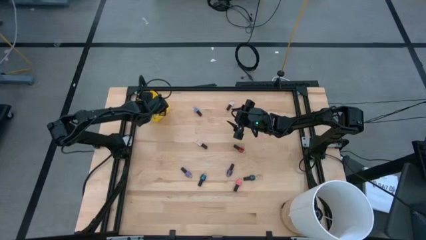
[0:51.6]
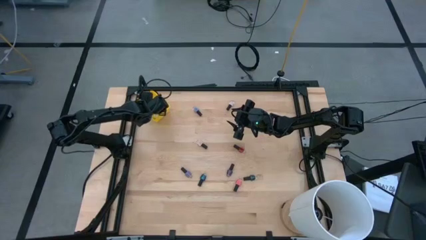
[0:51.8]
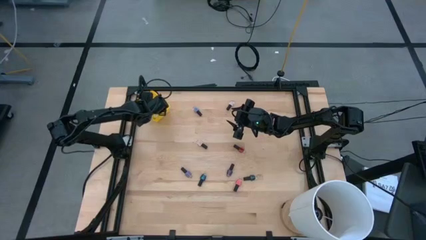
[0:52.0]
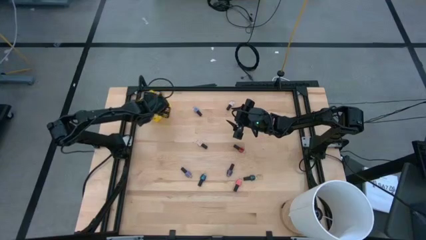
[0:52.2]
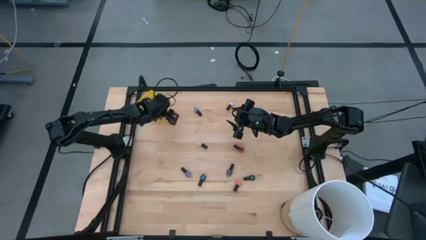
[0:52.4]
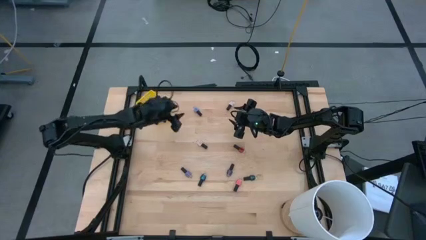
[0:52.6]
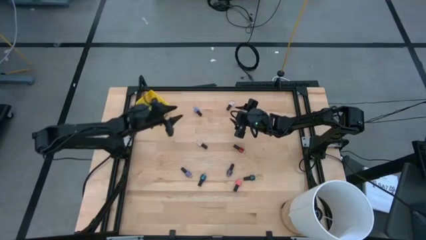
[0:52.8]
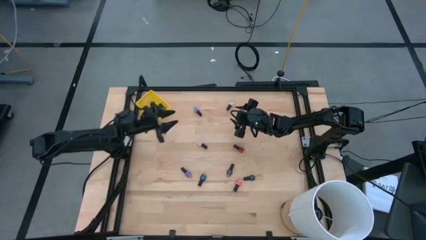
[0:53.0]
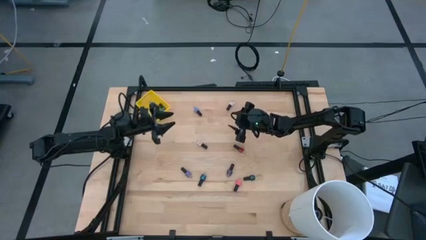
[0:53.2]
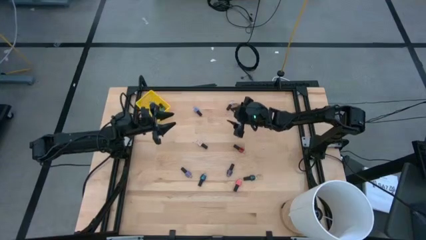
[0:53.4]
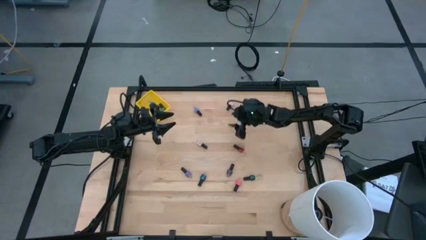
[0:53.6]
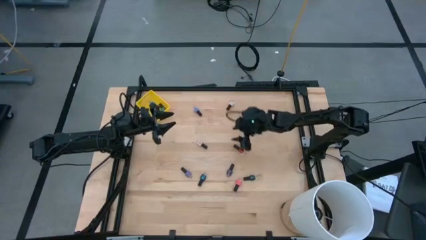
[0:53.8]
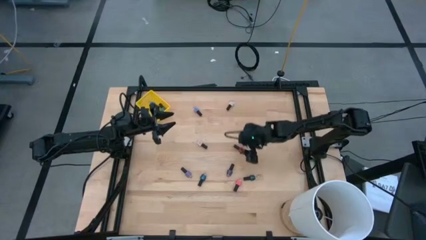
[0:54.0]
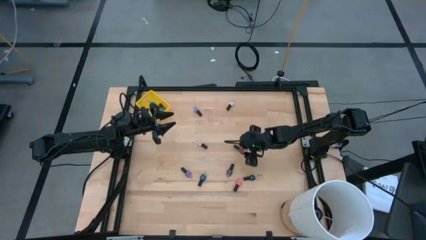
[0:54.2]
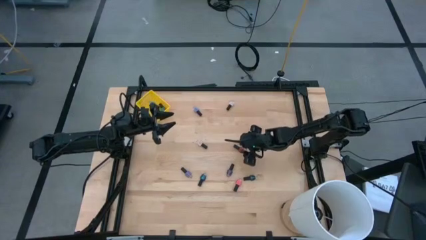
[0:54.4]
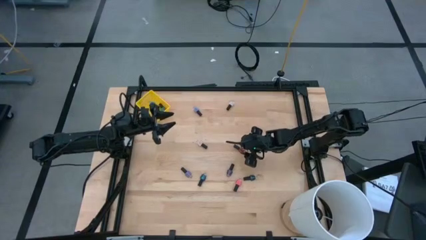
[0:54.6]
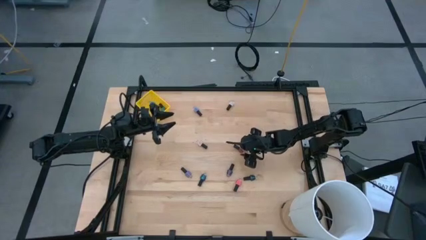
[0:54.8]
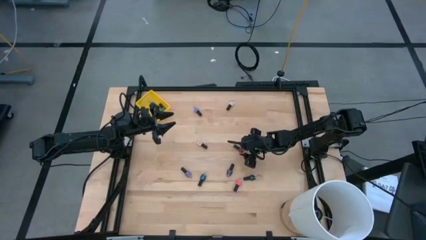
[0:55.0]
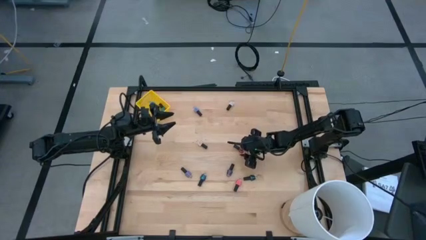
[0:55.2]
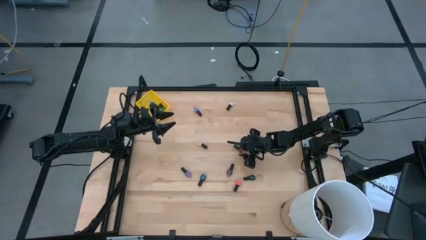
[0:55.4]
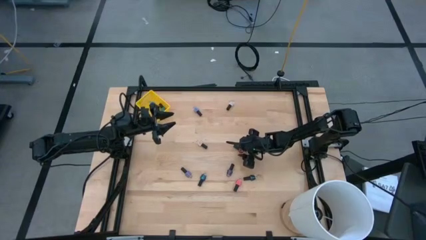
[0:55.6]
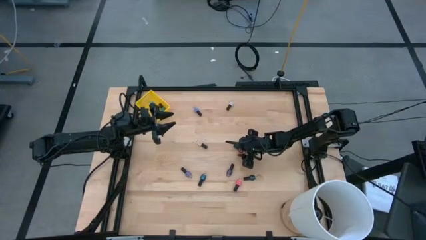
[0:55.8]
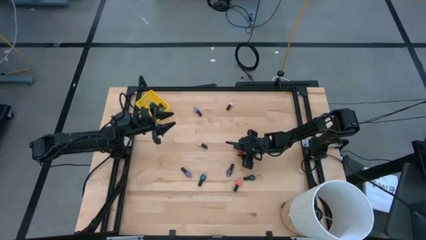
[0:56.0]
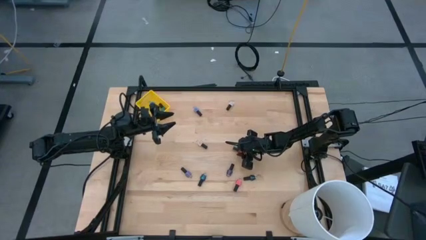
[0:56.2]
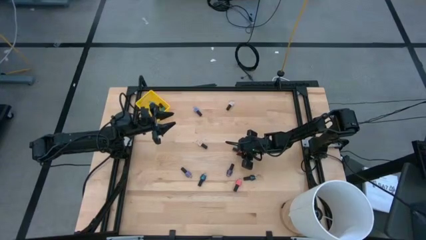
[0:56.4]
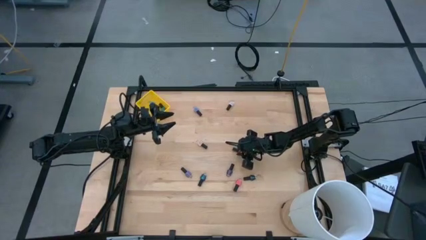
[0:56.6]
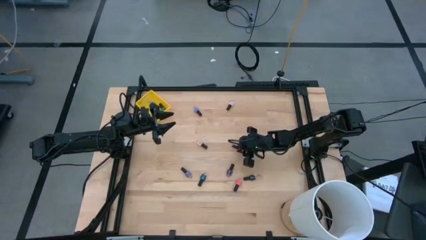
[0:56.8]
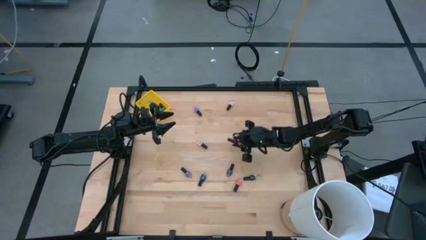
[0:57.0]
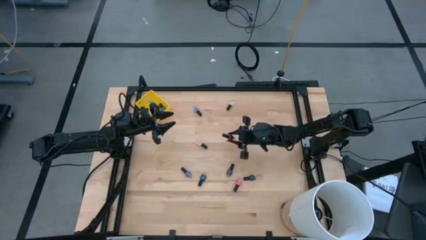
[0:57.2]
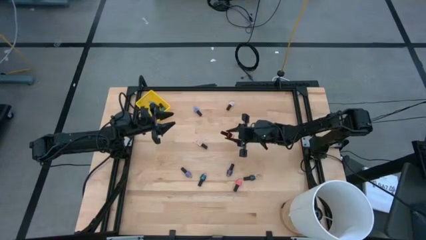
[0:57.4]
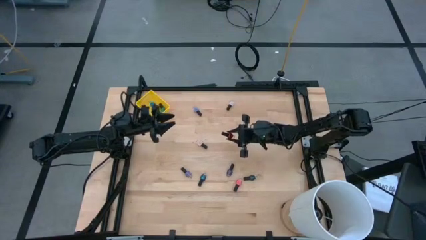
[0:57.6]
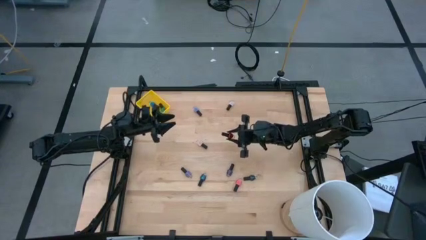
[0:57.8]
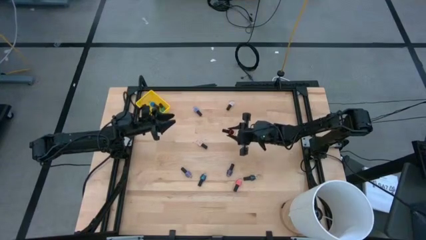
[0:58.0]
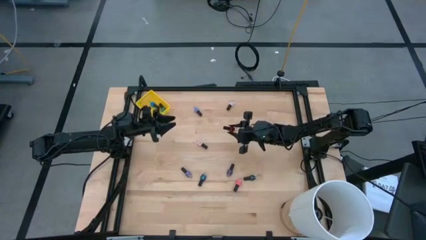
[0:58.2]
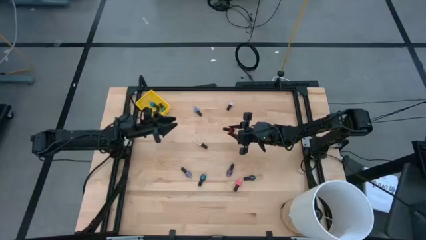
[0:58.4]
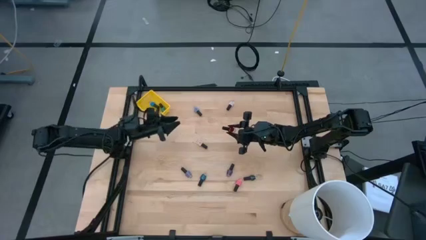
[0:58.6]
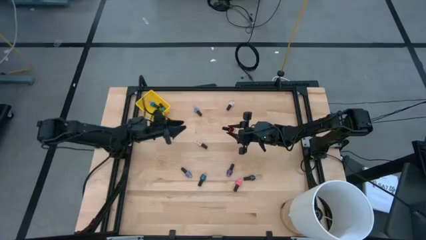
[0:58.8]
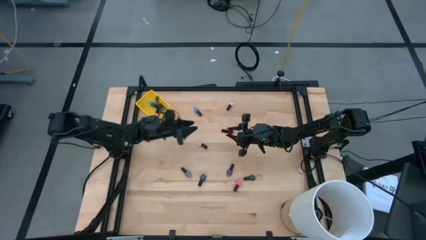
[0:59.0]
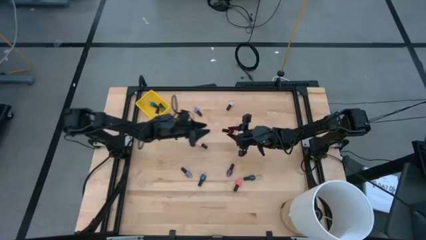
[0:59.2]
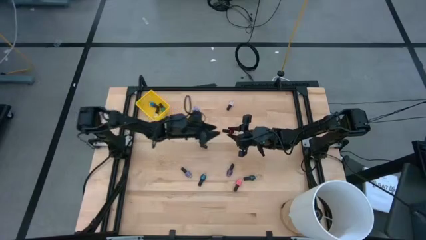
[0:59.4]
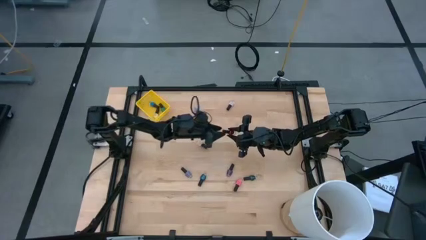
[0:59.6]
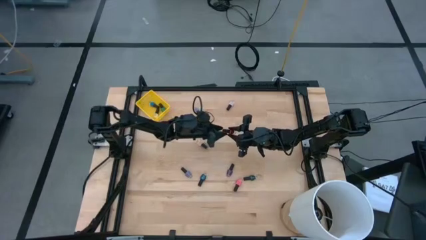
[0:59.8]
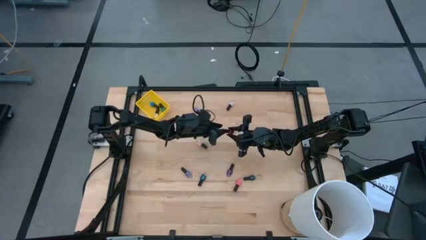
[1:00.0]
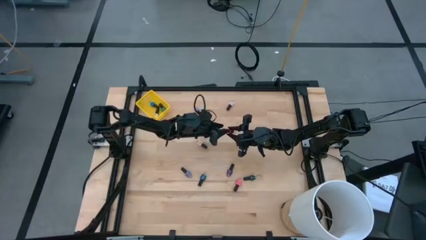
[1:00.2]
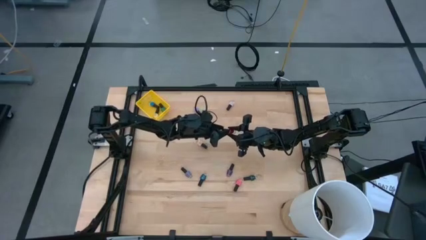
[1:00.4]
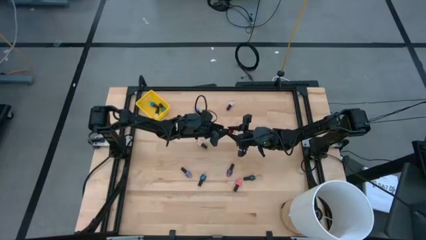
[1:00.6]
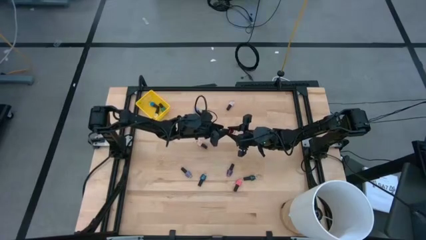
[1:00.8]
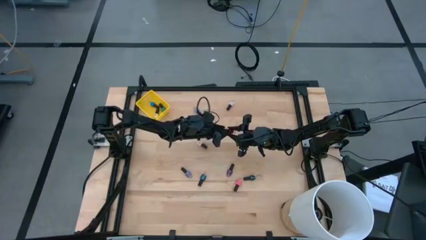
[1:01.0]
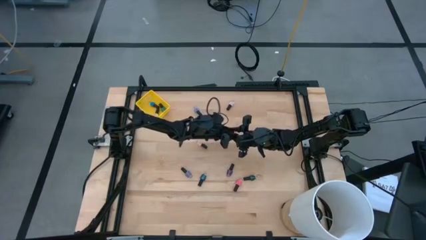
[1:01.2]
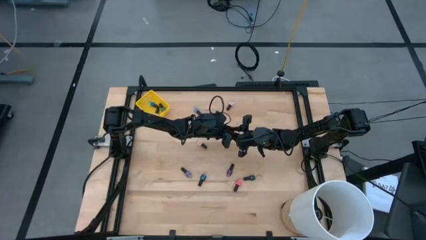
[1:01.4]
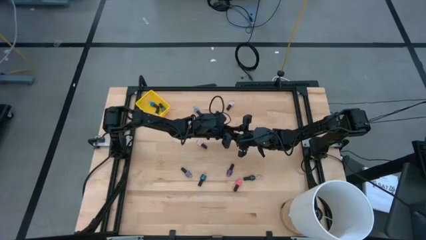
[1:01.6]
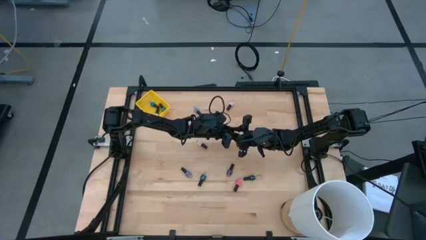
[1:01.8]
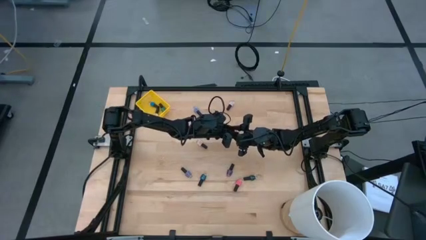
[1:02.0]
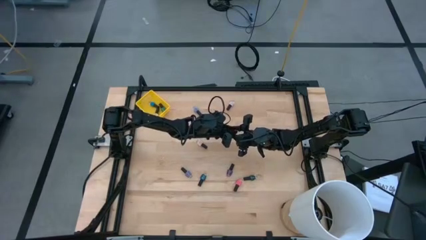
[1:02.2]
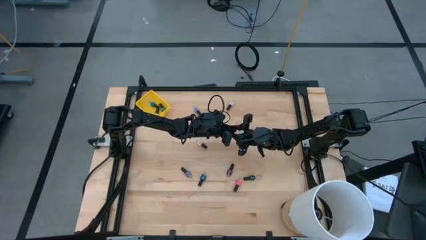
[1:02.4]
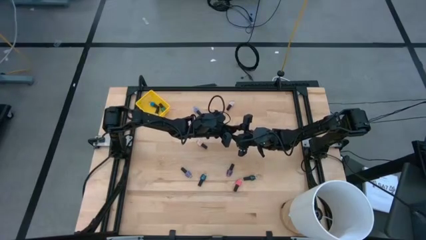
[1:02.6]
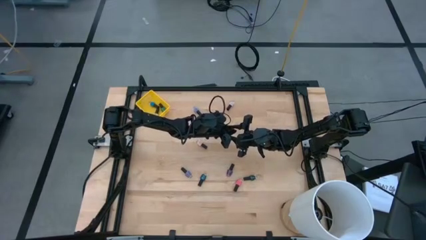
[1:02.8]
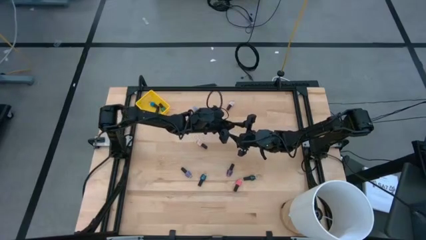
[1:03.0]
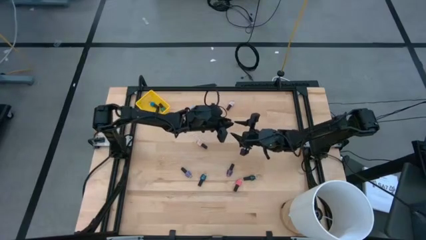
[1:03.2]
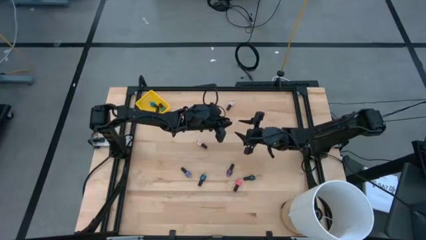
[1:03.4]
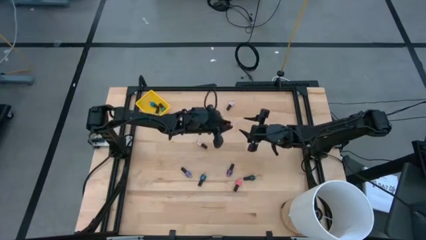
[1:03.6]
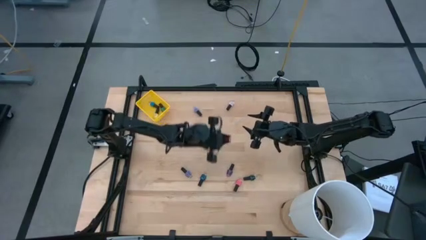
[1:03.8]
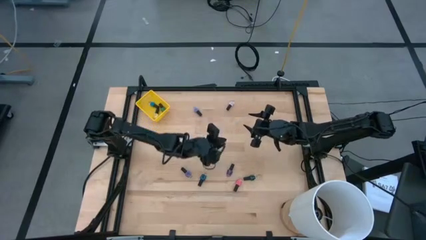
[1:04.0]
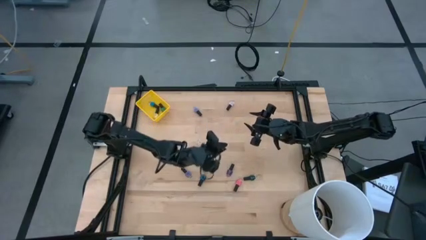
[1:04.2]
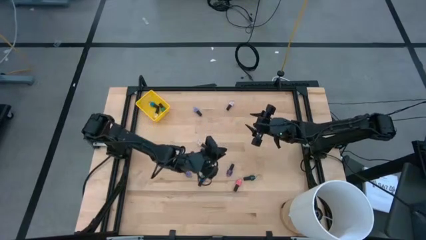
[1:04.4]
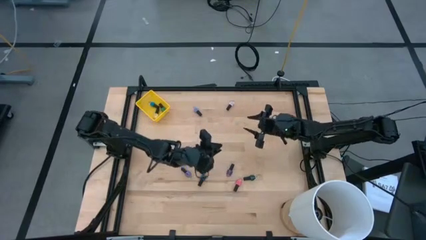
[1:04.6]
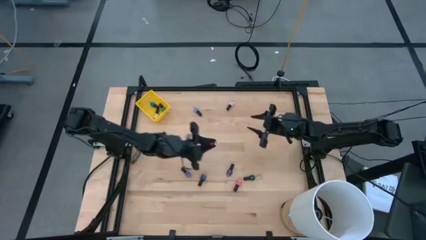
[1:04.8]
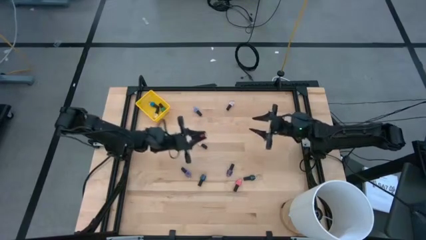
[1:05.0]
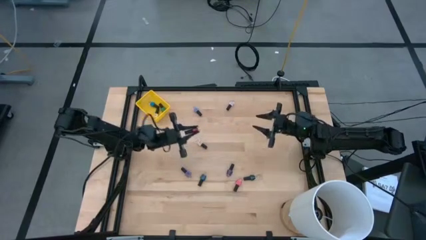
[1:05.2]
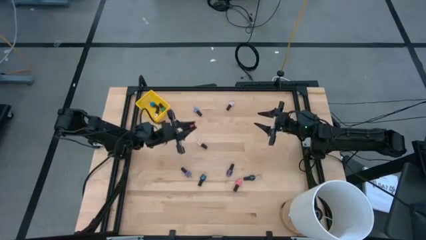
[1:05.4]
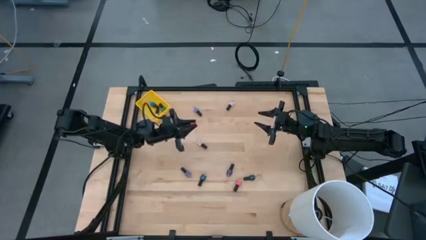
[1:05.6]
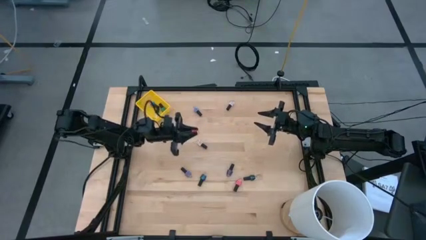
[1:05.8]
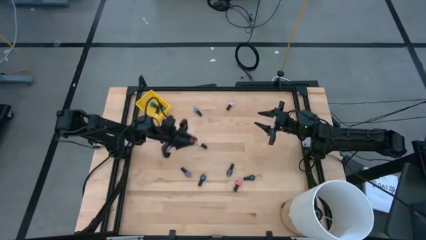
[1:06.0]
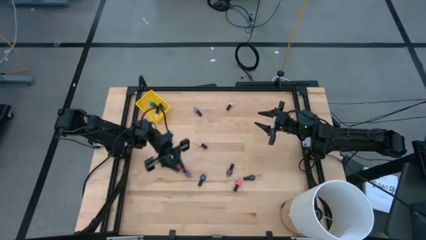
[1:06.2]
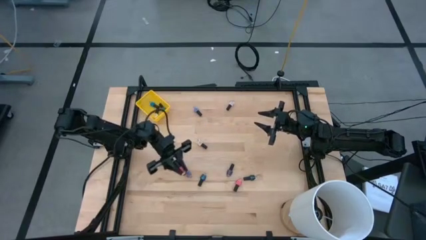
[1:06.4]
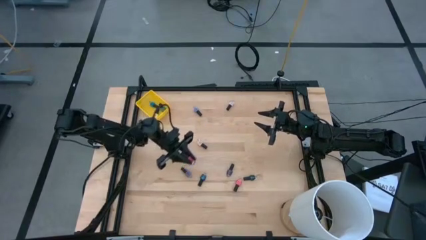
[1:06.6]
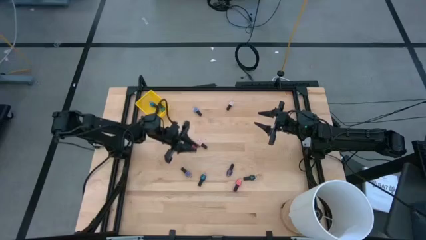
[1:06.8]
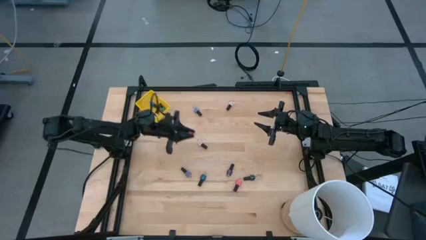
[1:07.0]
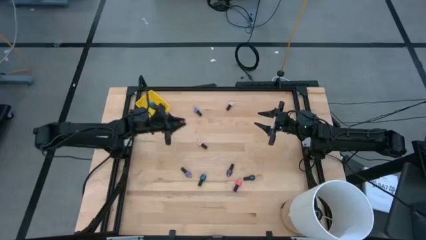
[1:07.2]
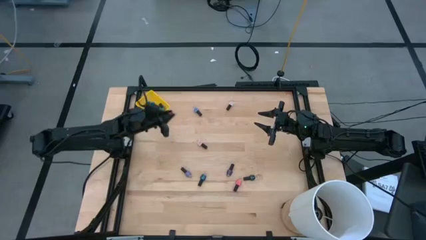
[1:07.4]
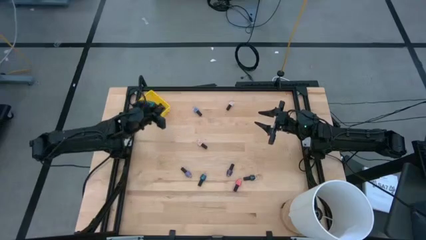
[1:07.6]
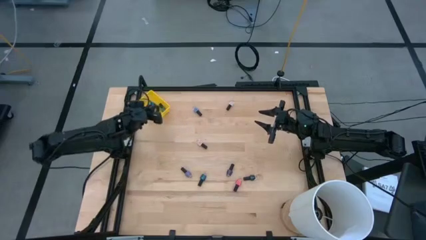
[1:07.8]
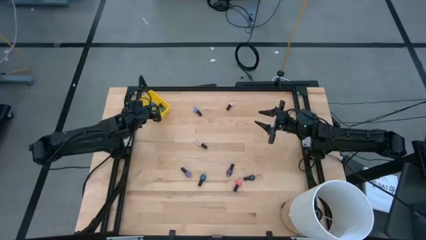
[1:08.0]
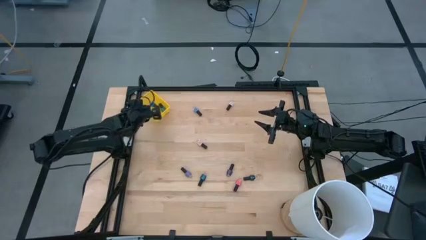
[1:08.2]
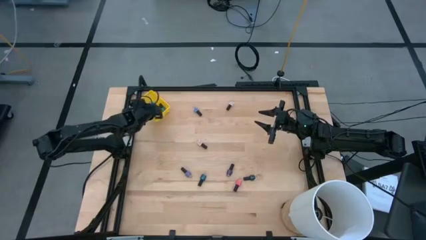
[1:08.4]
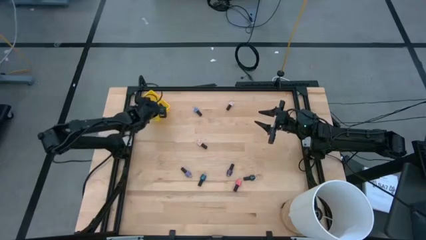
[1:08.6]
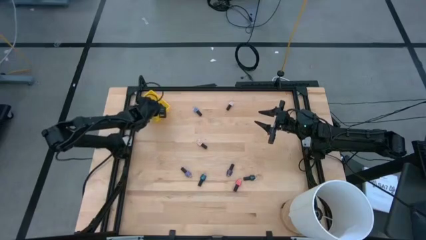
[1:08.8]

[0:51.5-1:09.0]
Task: Pick & Place Nail Polish
Put the red nail polish into the yellow bin
